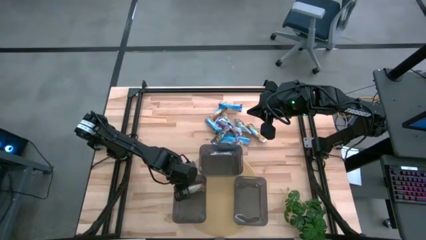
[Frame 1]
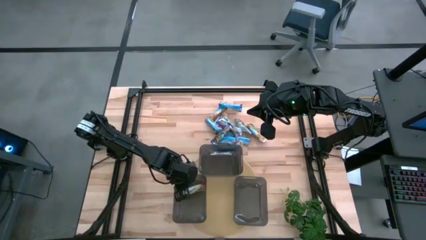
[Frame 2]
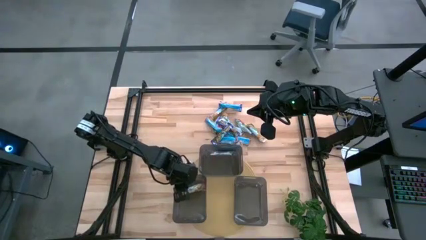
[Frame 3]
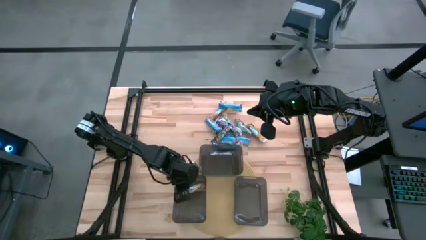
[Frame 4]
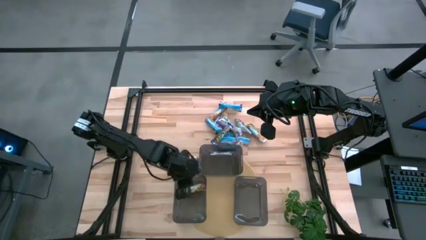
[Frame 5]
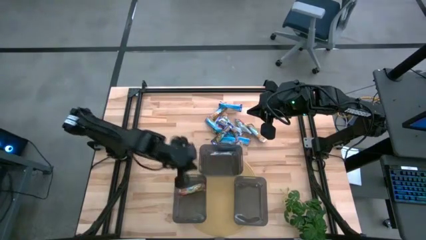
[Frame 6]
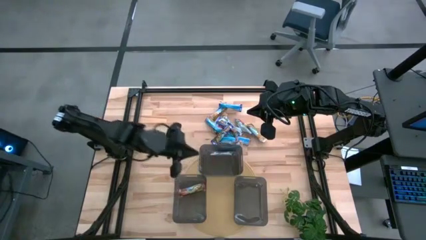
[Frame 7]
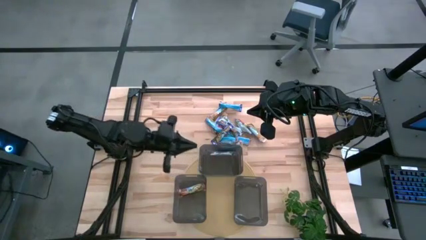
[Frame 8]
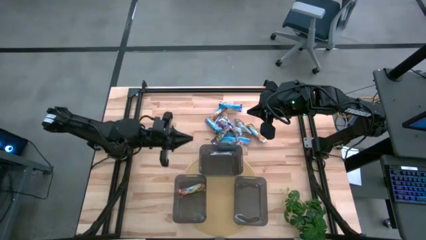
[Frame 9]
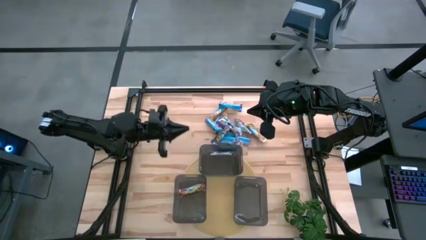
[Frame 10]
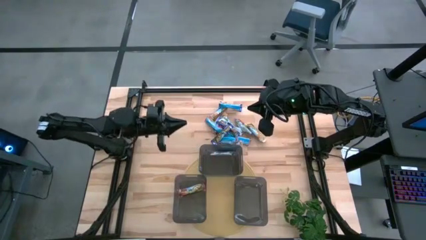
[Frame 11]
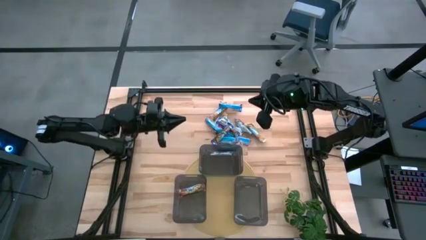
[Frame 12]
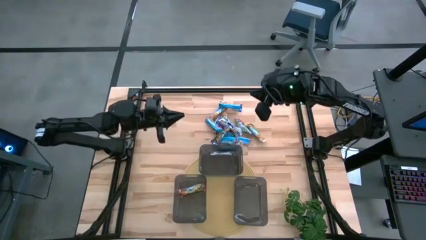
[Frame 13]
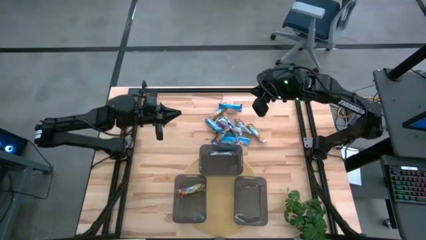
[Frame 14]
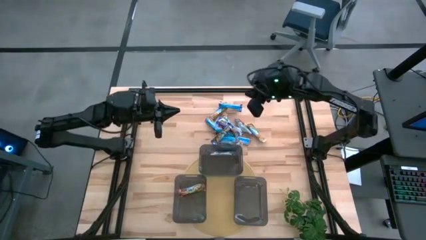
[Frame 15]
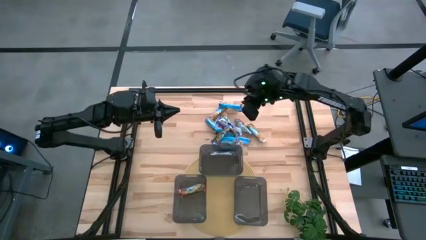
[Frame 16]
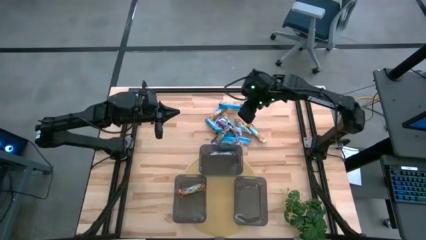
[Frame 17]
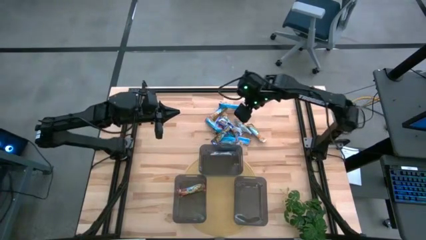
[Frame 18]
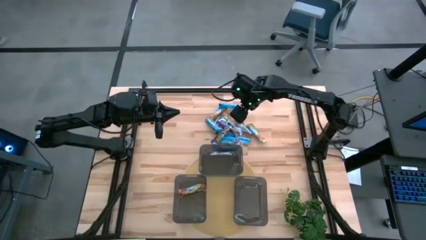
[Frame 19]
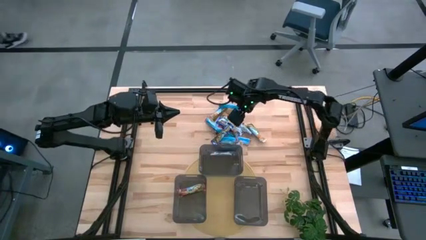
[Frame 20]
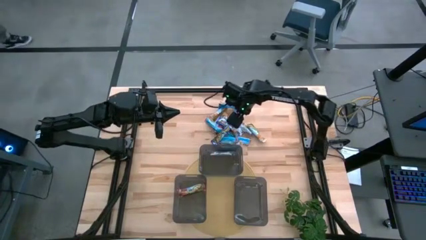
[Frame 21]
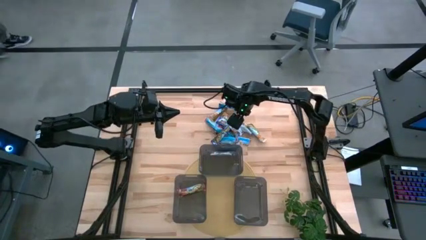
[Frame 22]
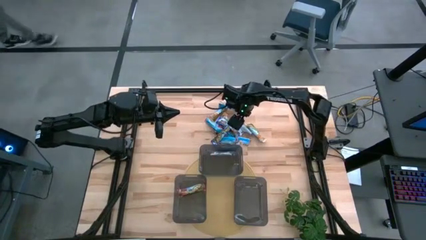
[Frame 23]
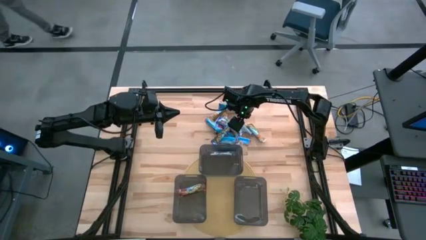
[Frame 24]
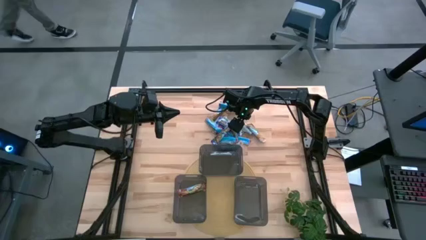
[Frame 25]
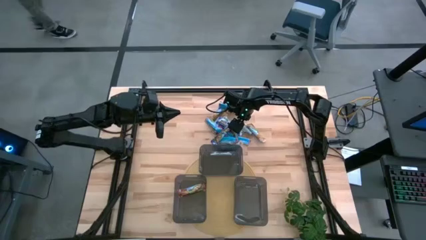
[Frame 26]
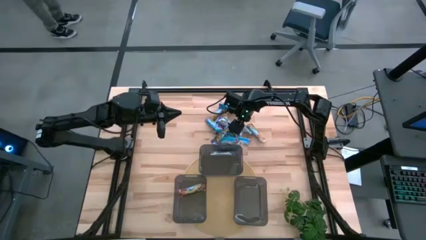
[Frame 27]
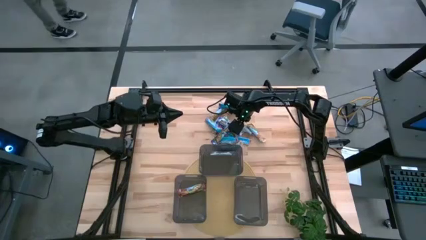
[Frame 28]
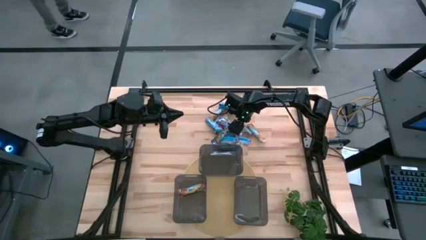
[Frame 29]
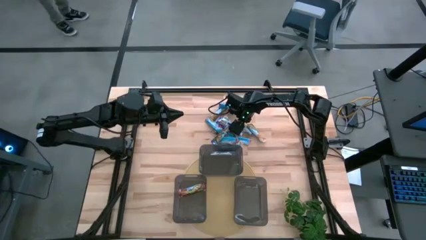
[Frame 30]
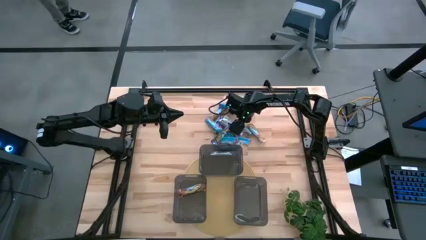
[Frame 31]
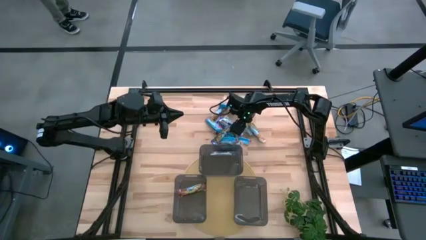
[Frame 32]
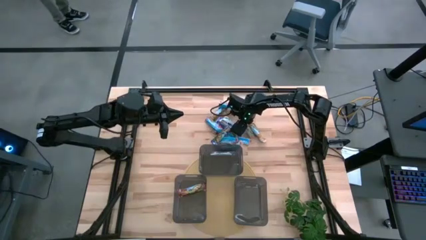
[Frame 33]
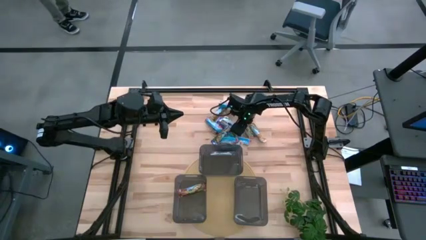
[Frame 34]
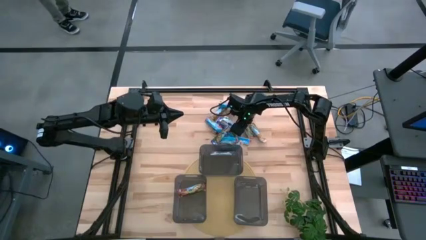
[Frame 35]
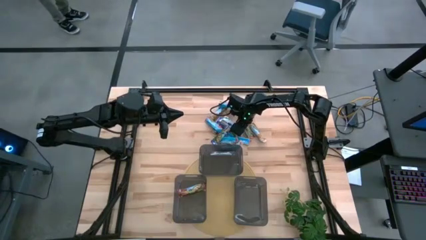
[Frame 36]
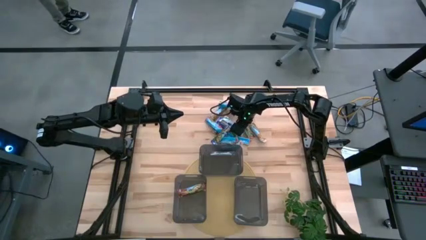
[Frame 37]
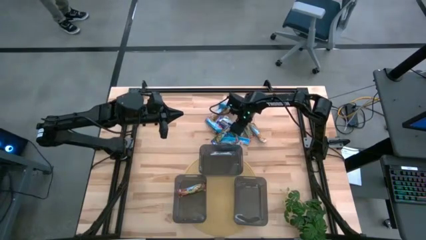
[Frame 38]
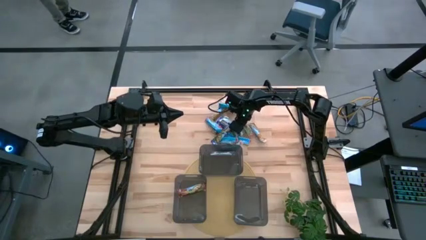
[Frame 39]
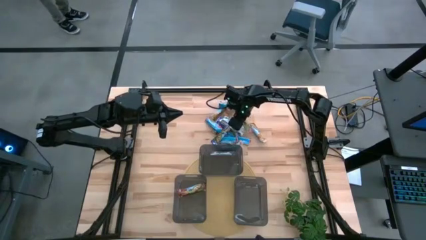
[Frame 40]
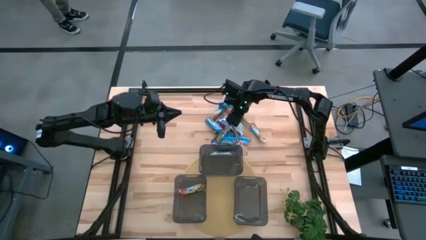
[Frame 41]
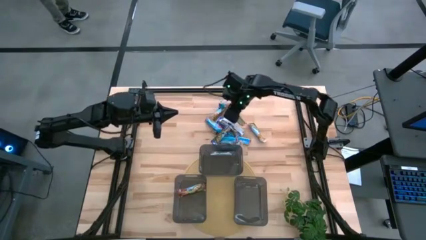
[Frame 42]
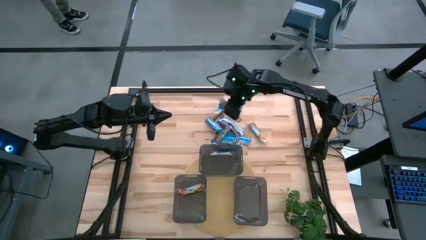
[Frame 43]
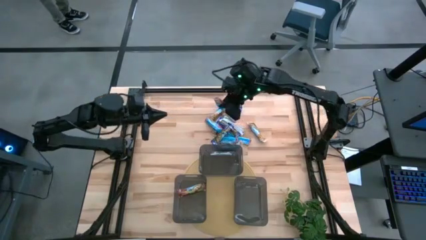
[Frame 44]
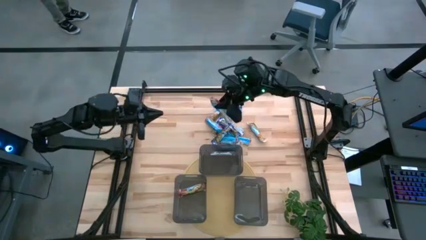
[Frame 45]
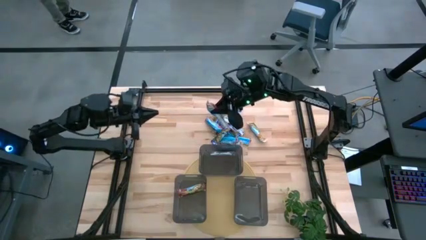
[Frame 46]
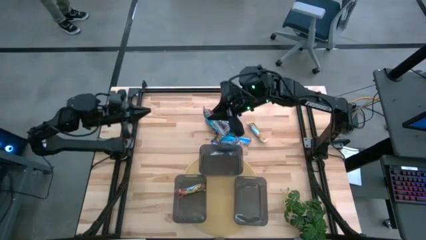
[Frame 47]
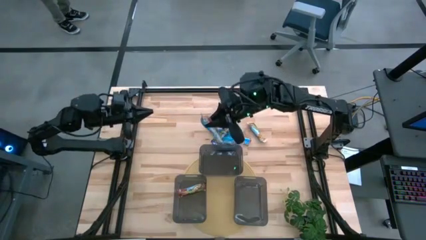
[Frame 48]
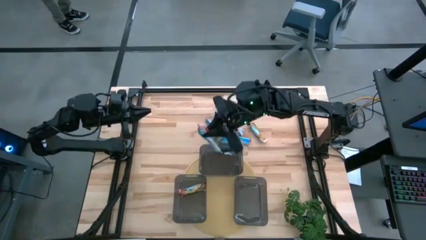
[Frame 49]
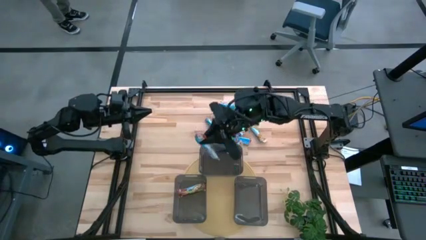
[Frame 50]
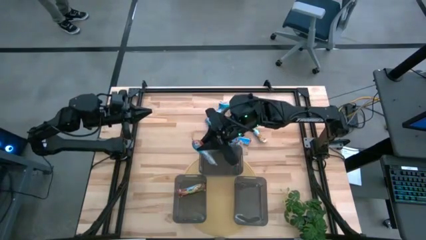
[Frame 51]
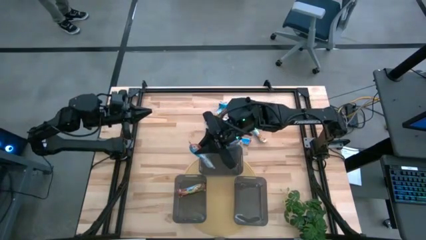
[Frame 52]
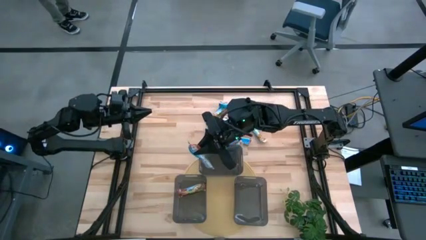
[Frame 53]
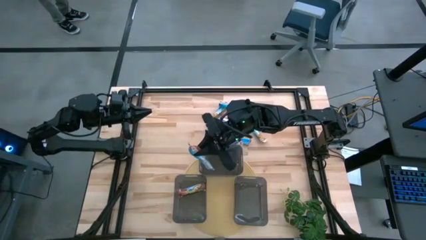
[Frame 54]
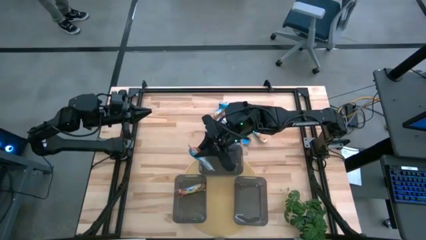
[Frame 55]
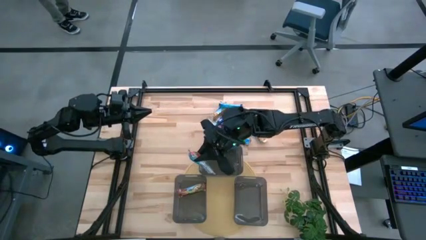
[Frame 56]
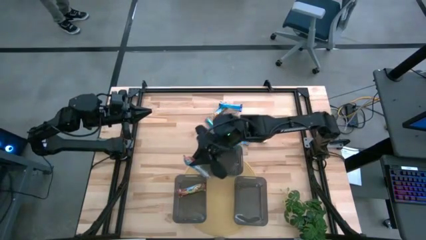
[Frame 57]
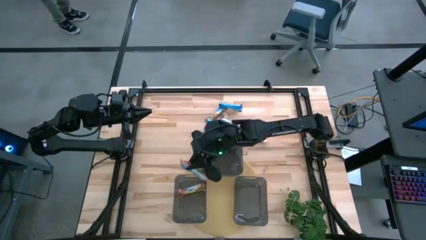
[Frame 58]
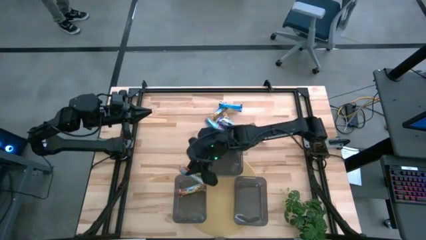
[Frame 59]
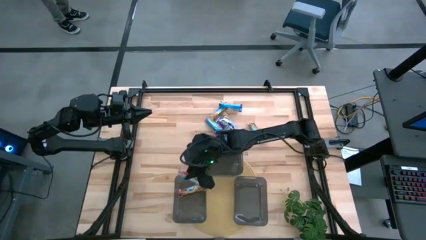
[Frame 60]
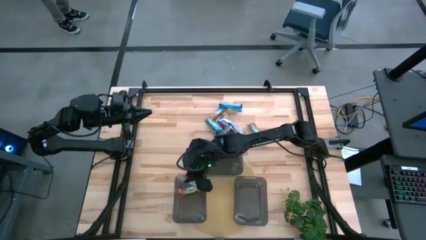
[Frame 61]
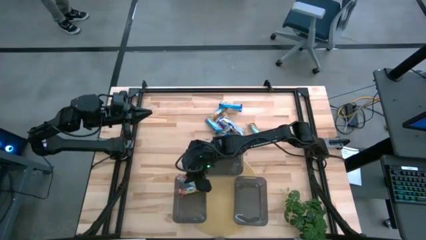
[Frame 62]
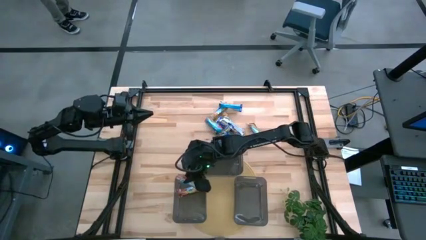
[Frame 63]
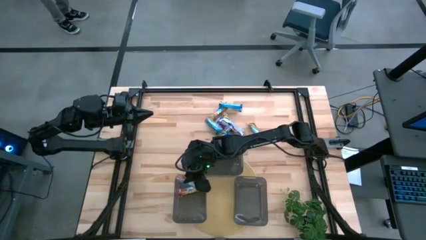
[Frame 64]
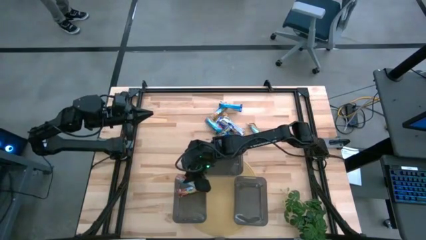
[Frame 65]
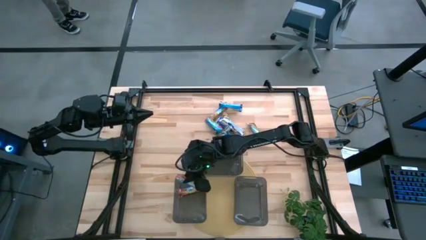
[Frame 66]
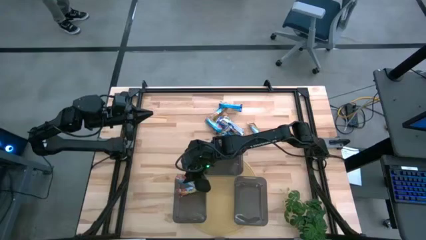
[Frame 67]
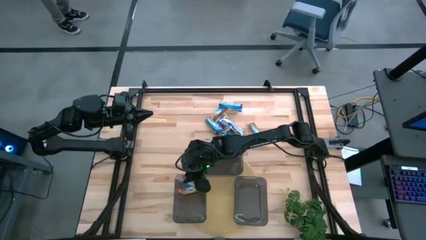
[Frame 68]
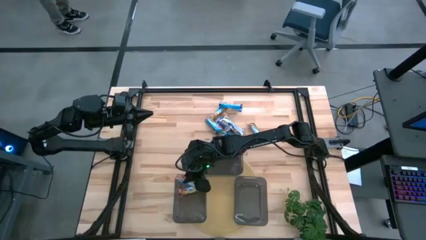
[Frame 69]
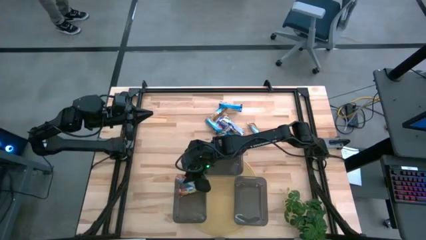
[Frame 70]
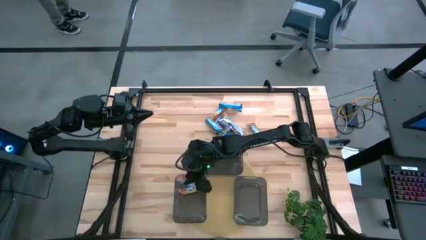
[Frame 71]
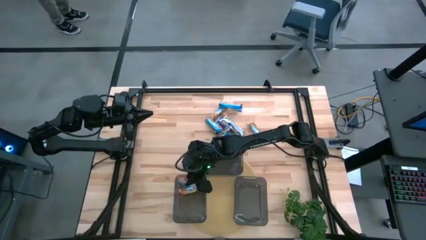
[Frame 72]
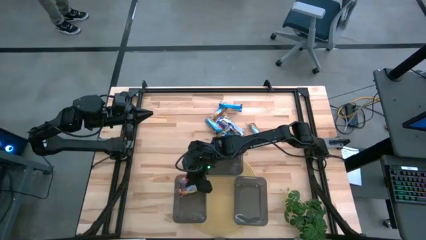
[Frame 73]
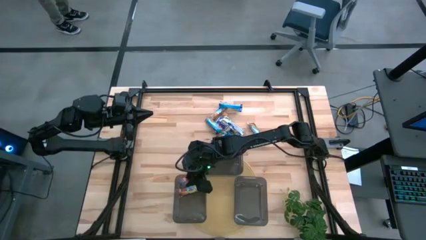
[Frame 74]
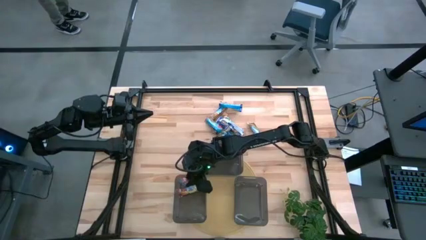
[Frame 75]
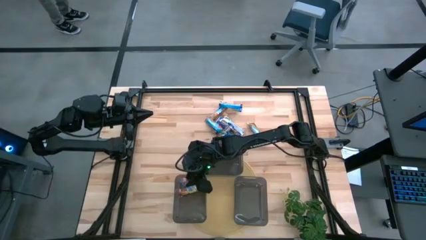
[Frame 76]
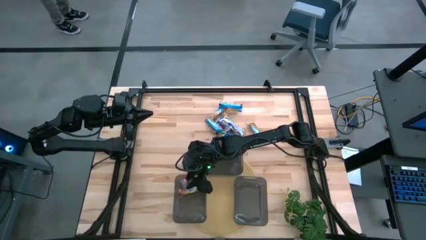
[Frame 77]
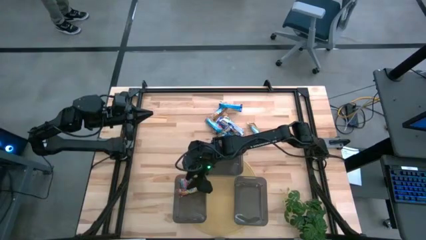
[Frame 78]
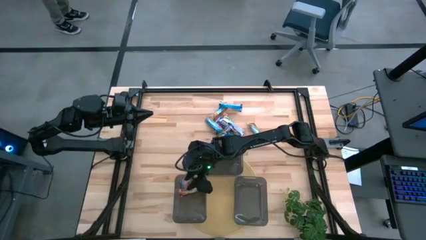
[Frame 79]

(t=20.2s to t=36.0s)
Task: Pick and place Granola Bars by type
Put the red granola bar into the bottom left black bin
